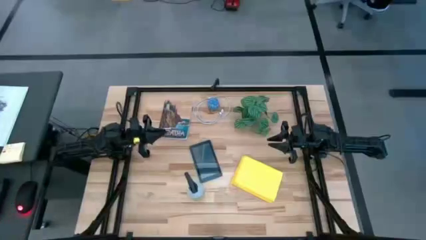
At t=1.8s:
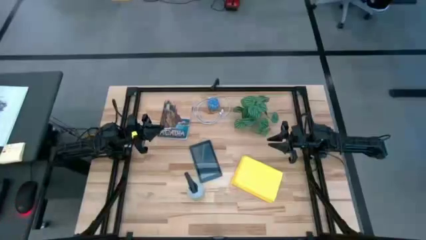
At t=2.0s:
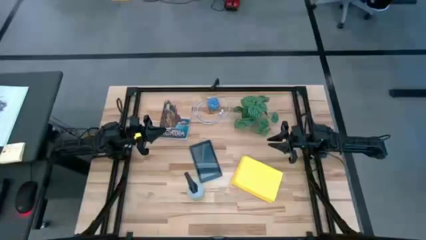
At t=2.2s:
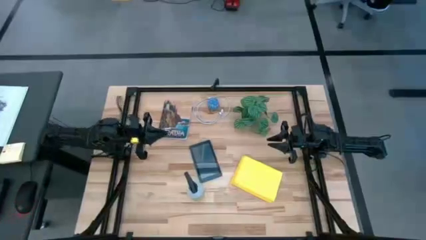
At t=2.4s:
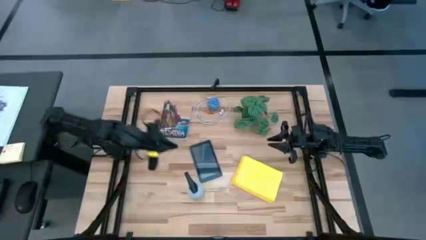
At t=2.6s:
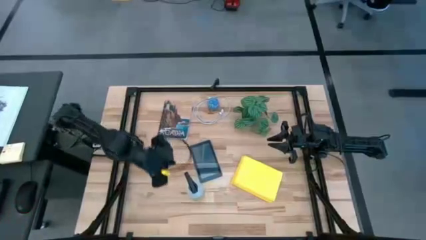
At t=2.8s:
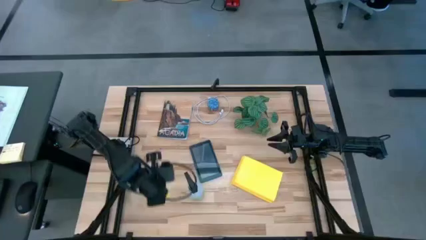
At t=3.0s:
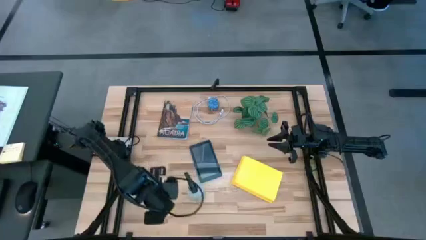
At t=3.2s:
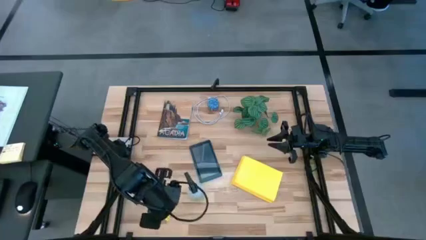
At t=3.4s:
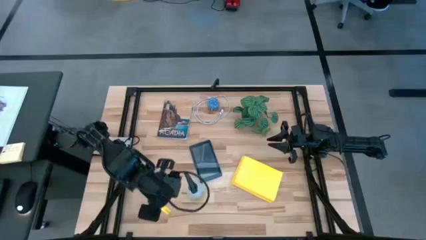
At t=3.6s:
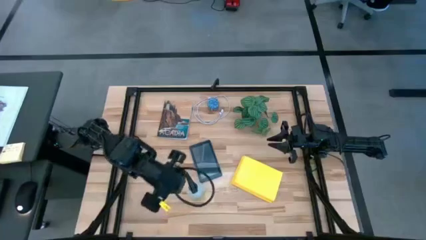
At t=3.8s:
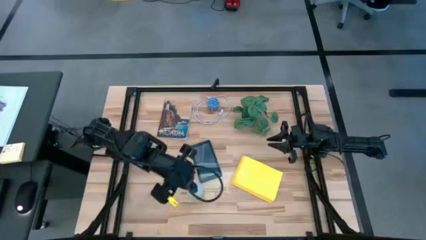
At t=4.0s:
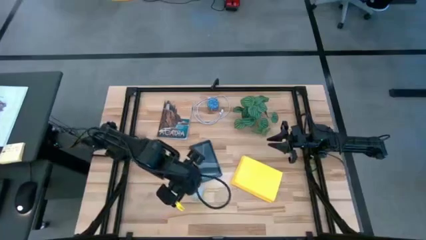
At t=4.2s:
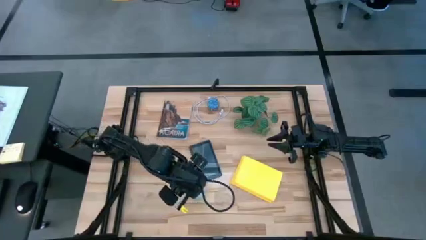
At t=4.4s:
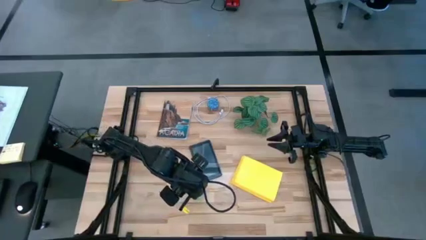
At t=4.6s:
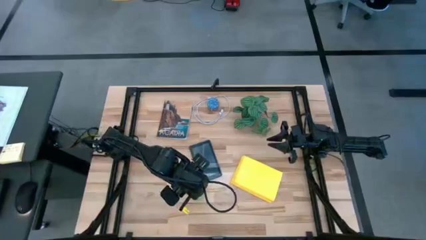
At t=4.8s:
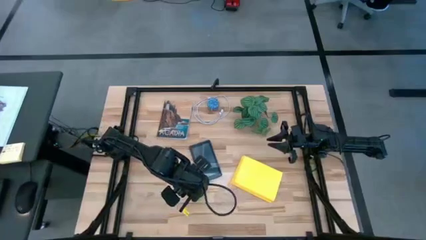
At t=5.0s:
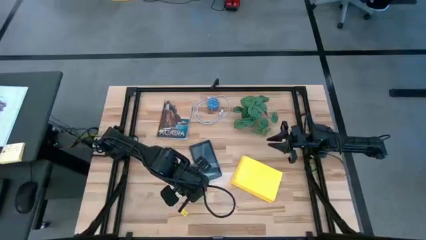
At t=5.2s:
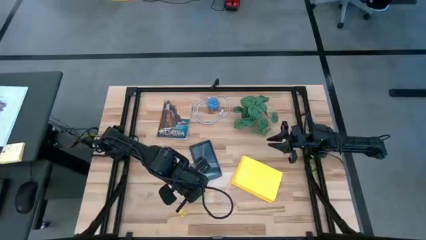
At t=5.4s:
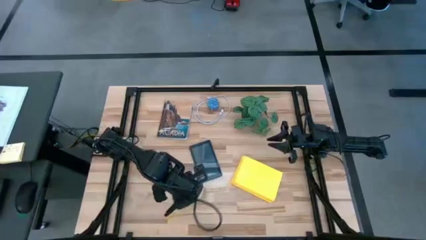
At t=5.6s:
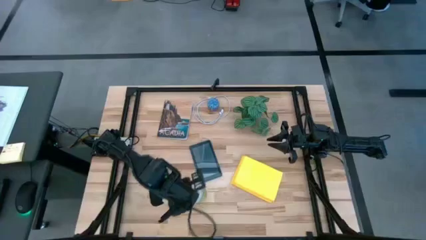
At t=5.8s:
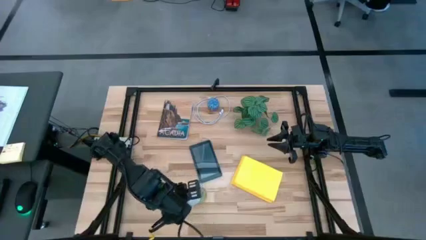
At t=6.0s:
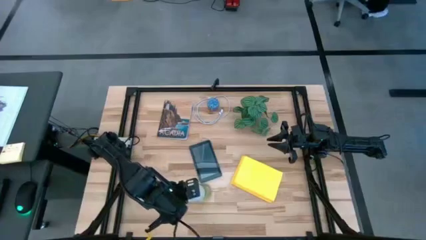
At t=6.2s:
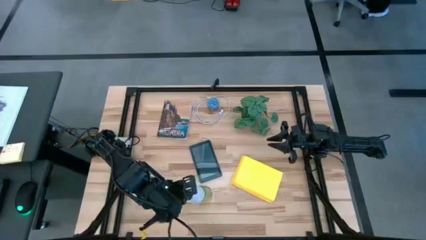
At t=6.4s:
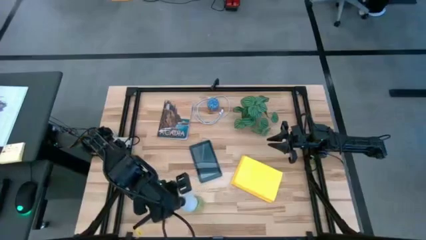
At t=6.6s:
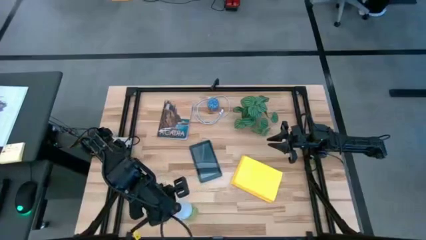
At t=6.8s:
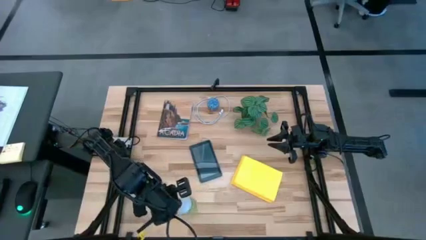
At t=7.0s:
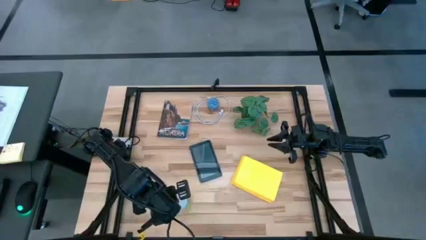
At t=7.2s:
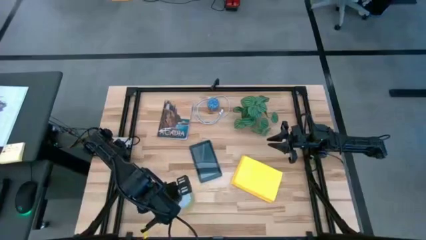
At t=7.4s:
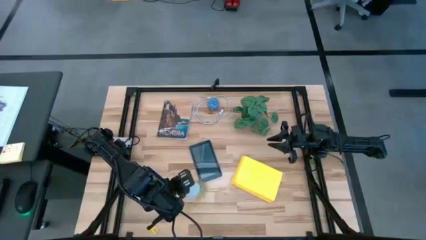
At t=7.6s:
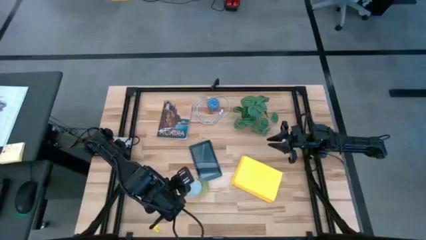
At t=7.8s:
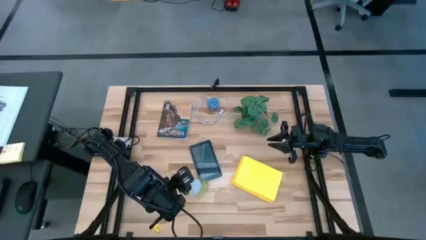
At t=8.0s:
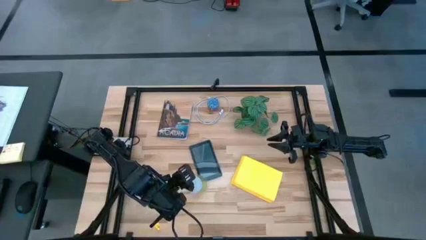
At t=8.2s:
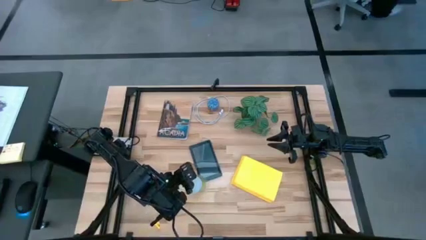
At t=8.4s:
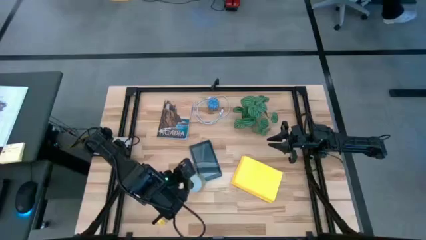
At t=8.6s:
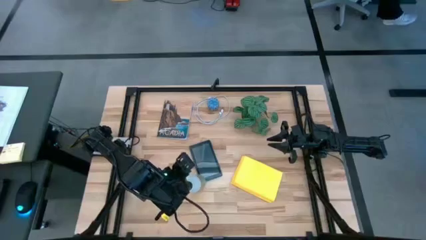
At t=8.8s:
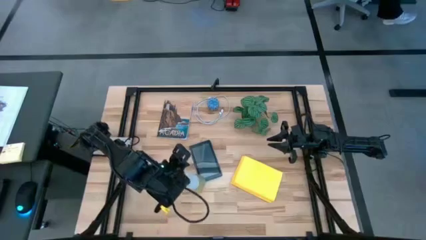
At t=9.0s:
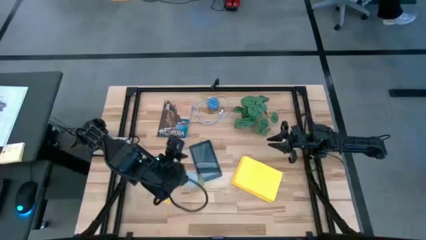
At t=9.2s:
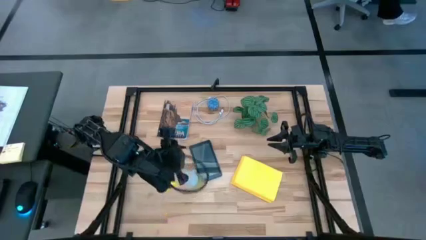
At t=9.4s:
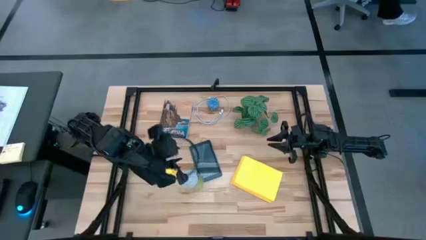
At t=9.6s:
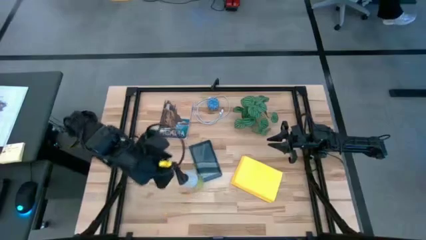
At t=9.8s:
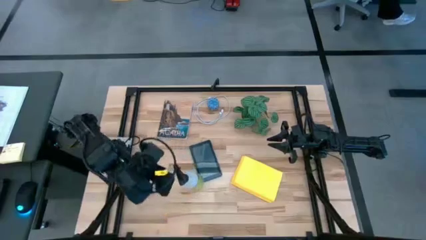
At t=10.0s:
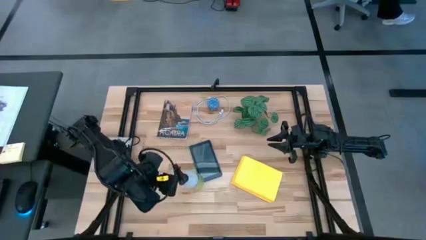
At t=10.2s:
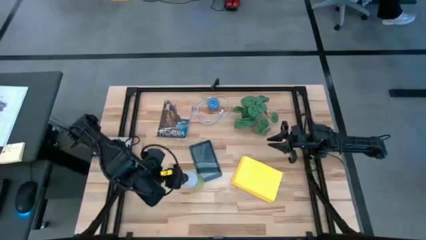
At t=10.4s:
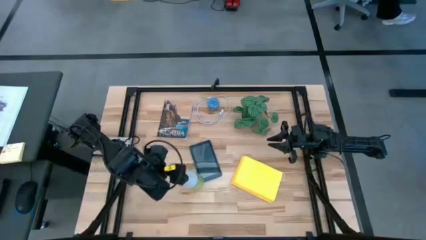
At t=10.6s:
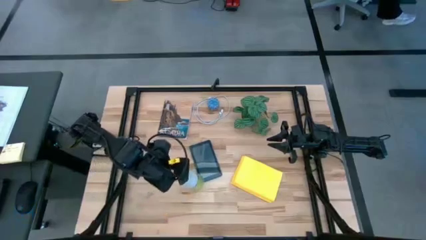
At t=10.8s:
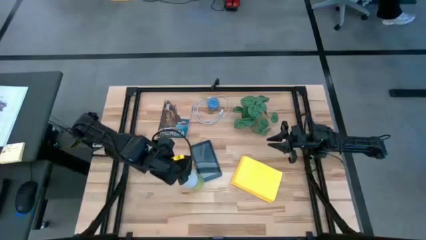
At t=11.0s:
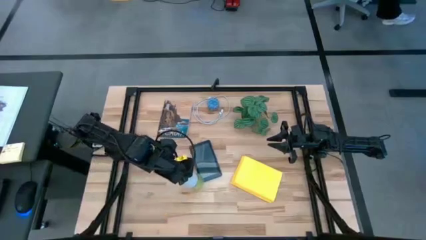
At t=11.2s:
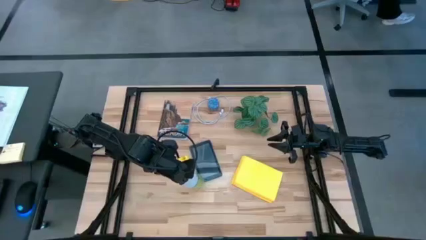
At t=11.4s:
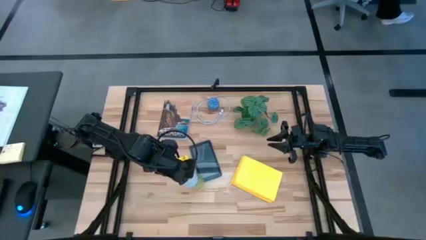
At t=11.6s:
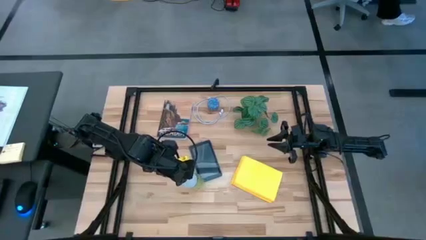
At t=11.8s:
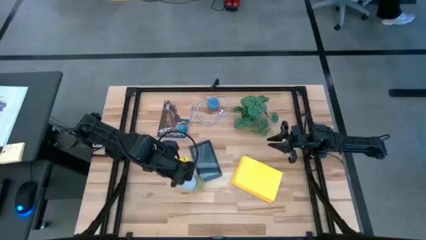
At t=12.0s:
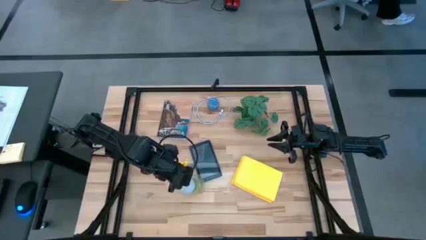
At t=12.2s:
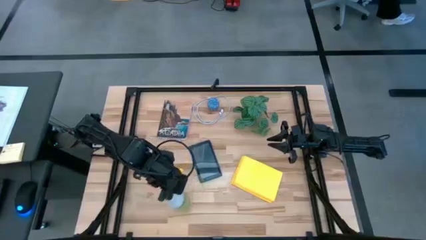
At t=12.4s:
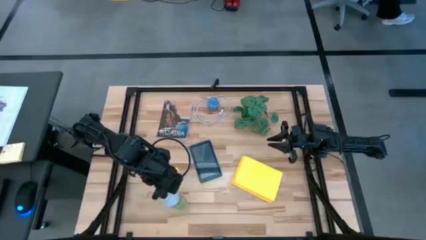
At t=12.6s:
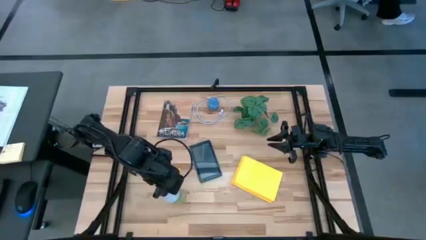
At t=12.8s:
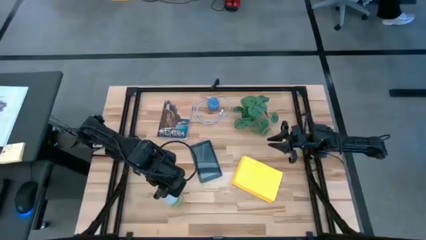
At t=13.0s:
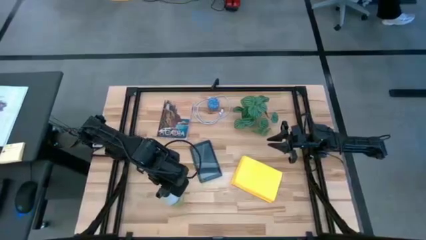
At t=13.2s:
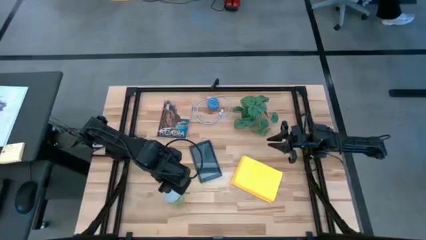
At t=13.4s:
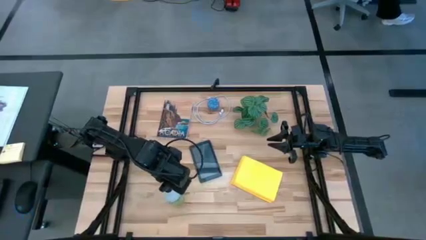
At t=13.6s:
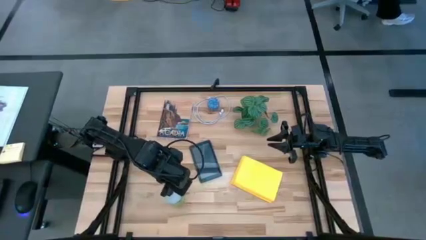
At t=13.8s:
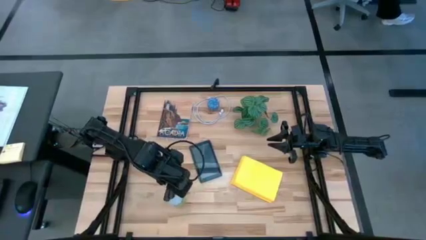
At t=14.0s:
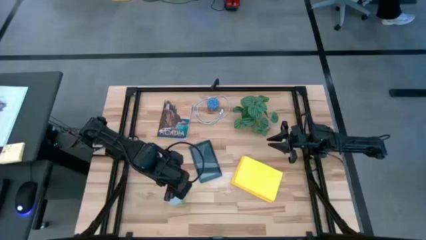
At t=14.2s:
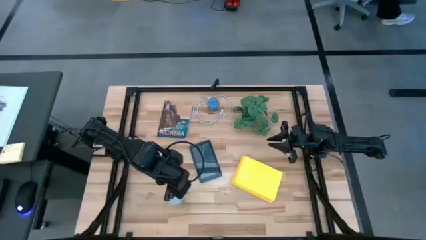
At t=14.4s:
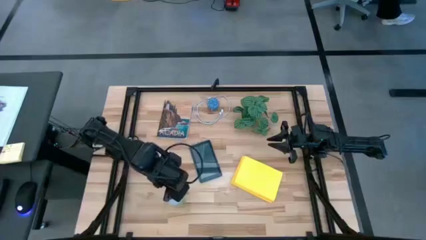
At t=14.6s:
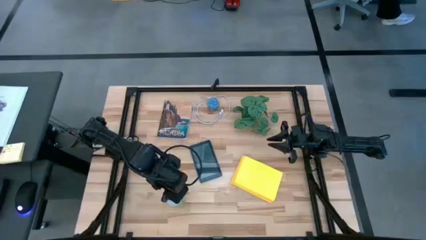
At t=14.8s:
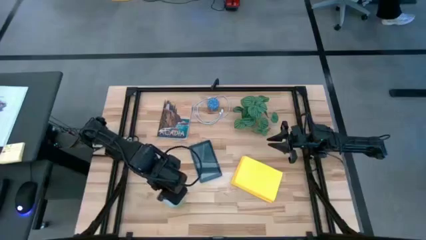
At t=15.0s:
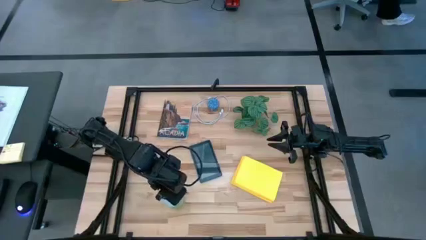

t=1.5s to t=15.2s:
Task: Apply microfiber cloth
Spray the front of the blue tablet
